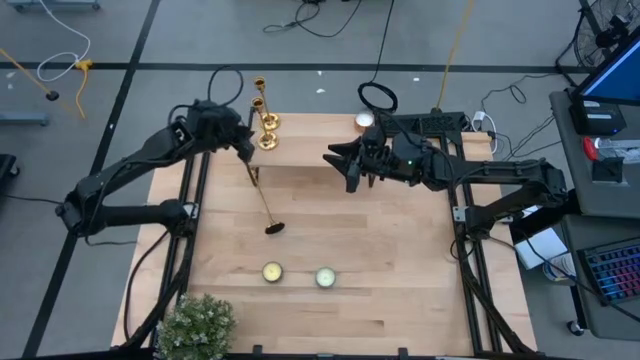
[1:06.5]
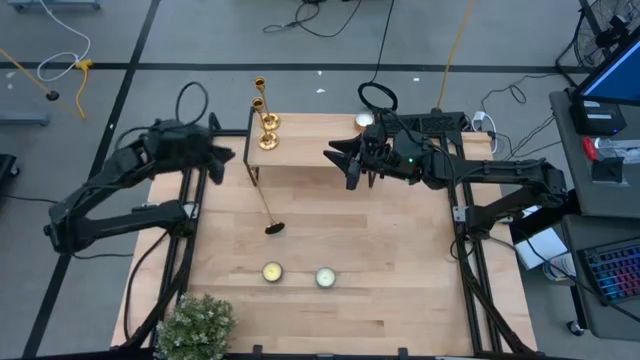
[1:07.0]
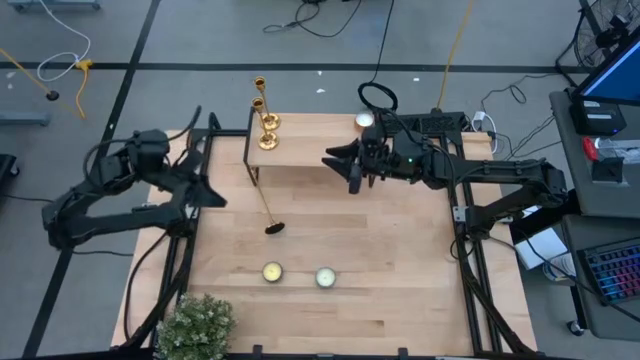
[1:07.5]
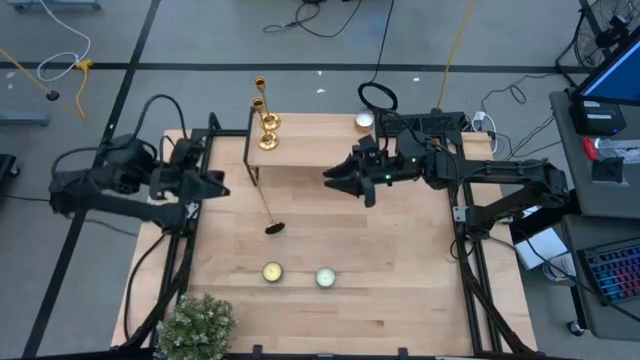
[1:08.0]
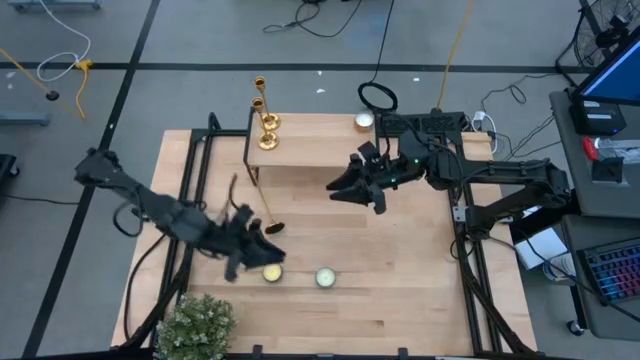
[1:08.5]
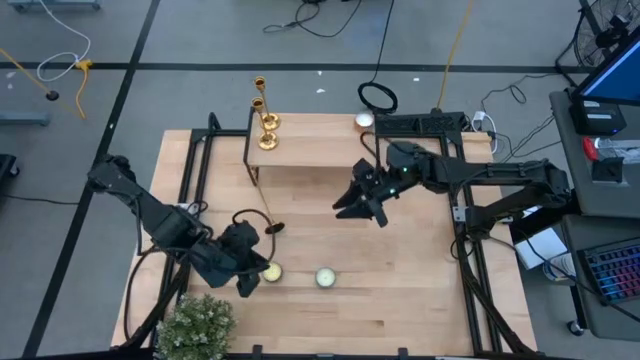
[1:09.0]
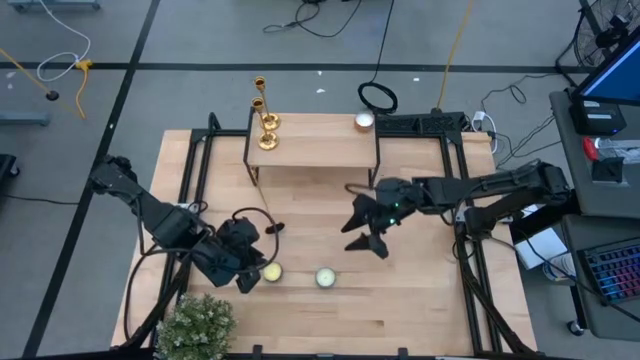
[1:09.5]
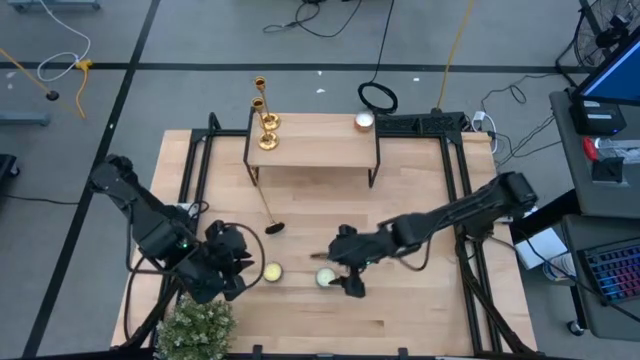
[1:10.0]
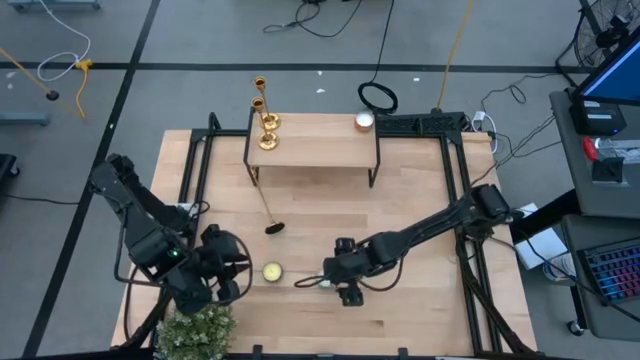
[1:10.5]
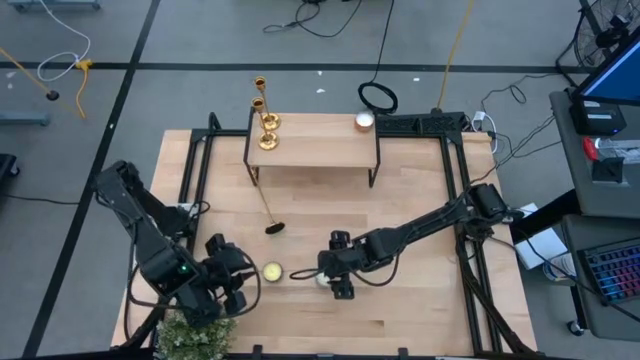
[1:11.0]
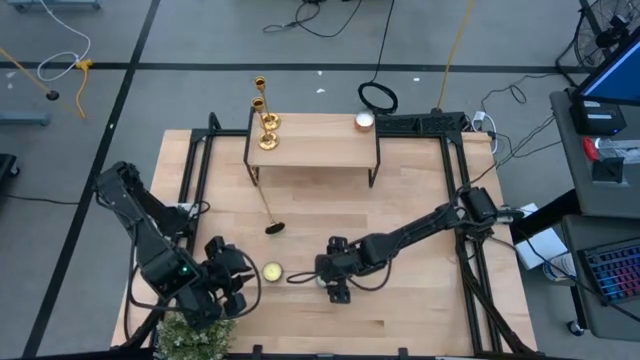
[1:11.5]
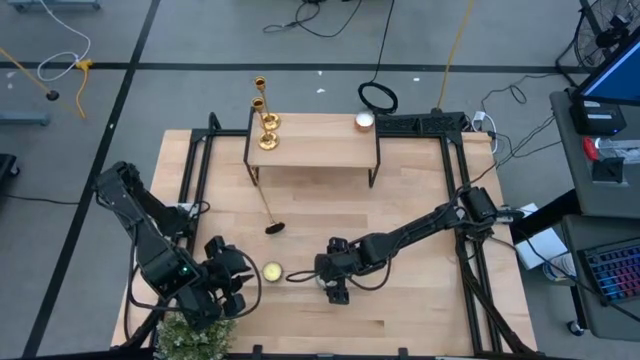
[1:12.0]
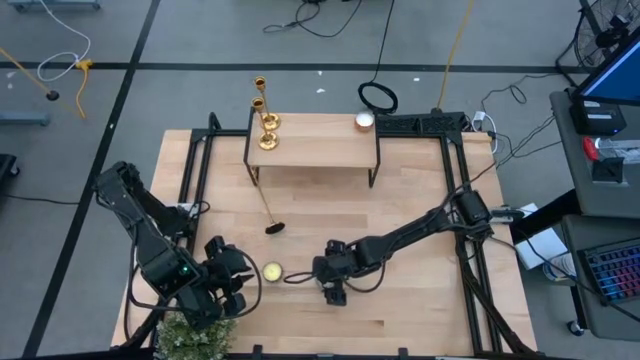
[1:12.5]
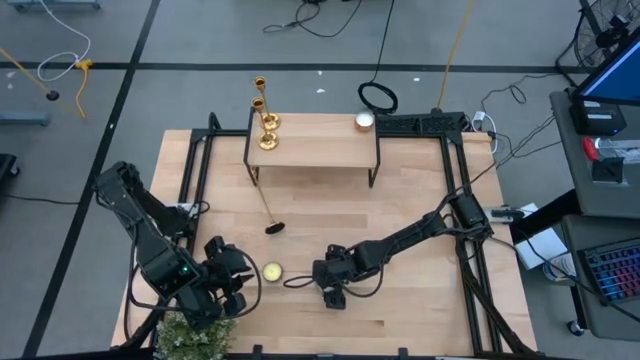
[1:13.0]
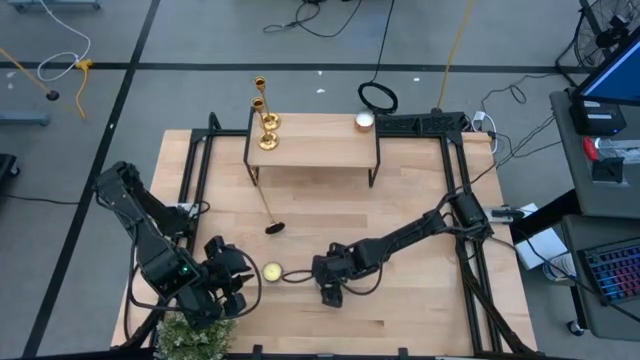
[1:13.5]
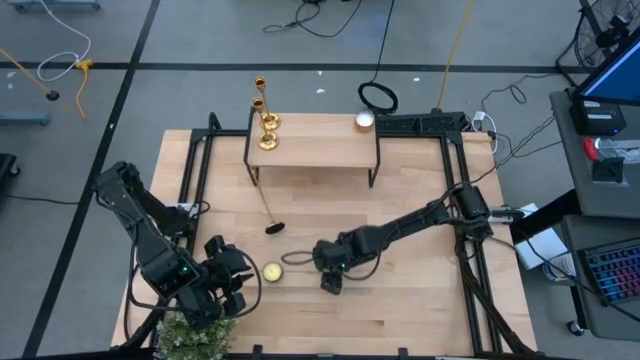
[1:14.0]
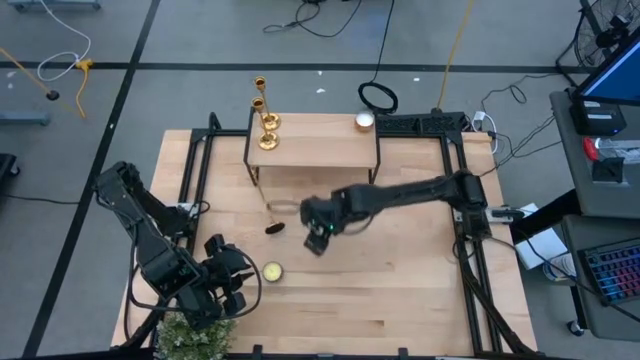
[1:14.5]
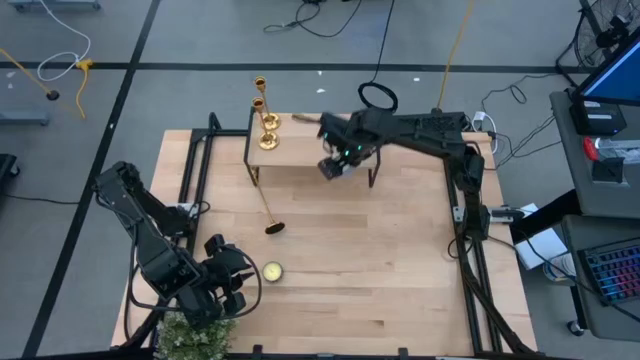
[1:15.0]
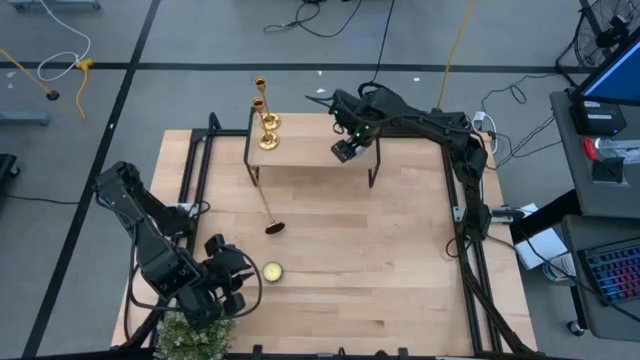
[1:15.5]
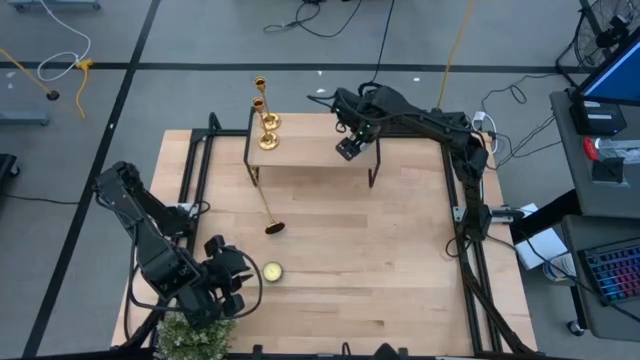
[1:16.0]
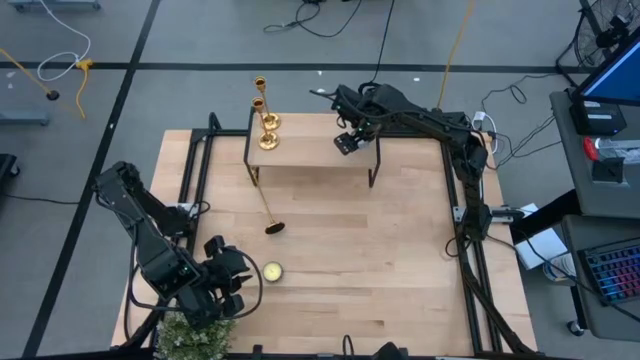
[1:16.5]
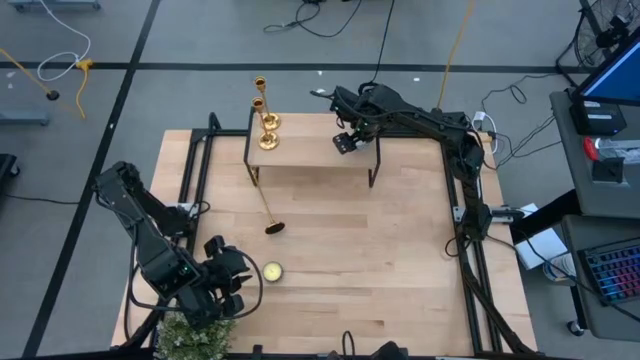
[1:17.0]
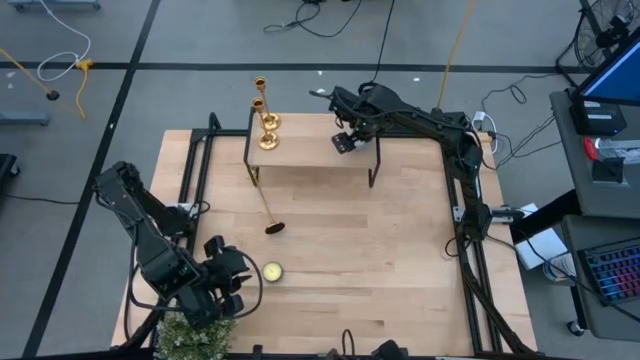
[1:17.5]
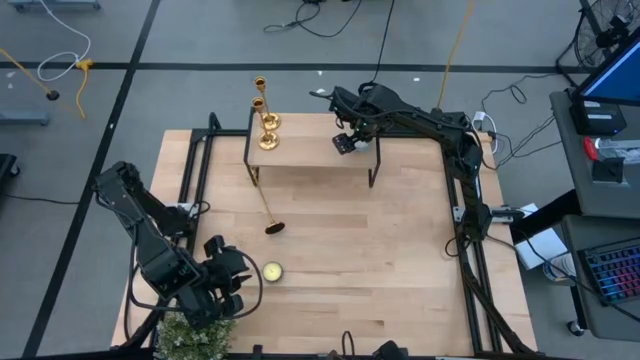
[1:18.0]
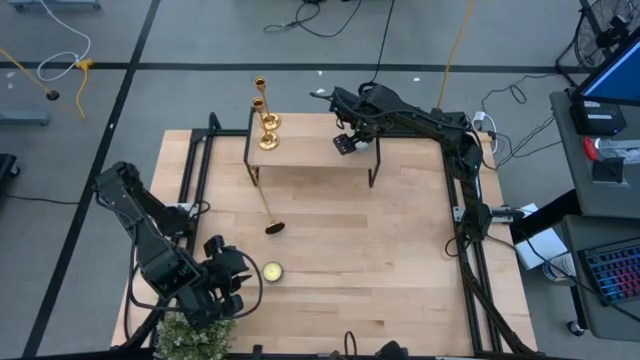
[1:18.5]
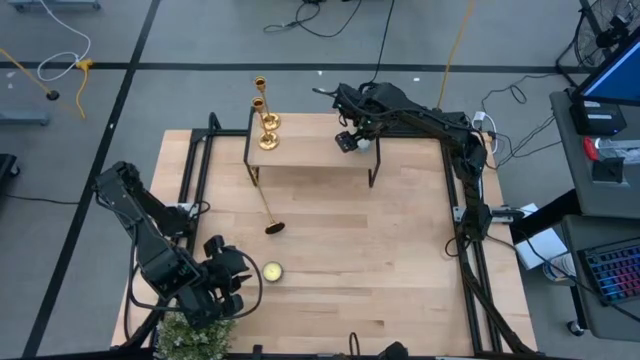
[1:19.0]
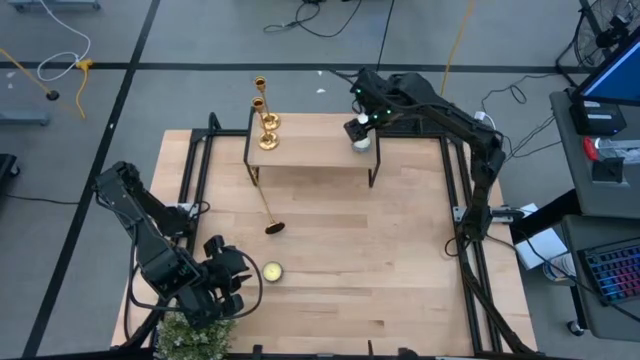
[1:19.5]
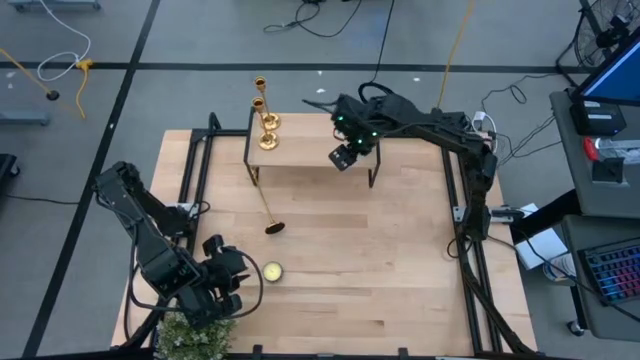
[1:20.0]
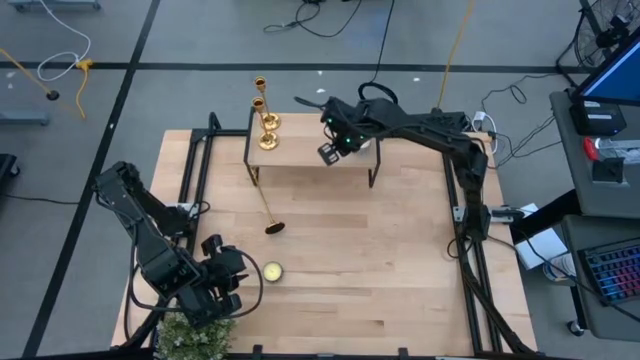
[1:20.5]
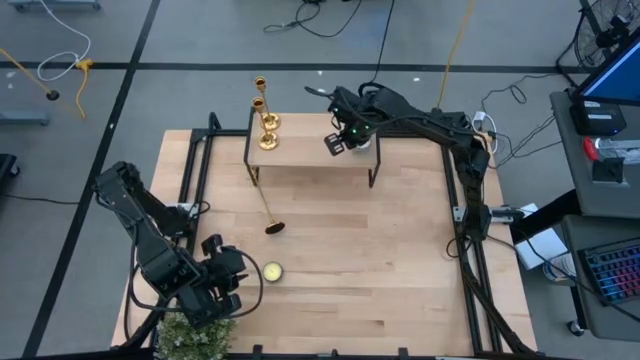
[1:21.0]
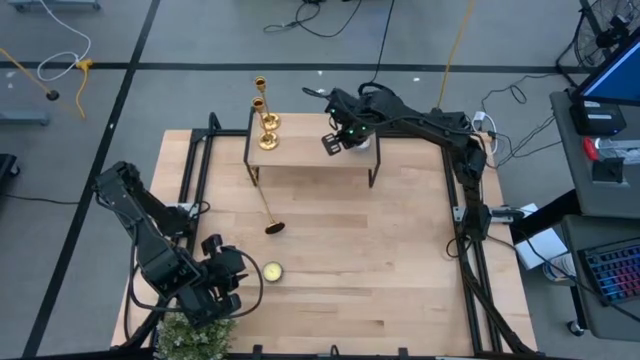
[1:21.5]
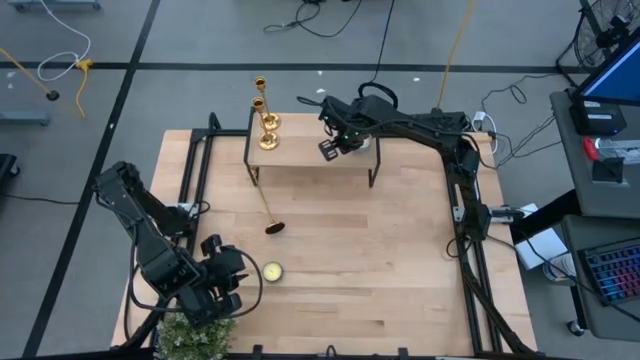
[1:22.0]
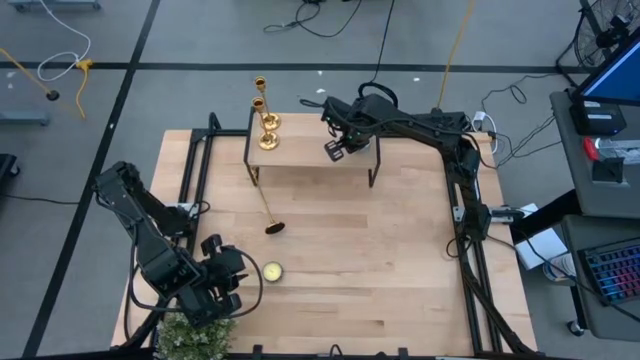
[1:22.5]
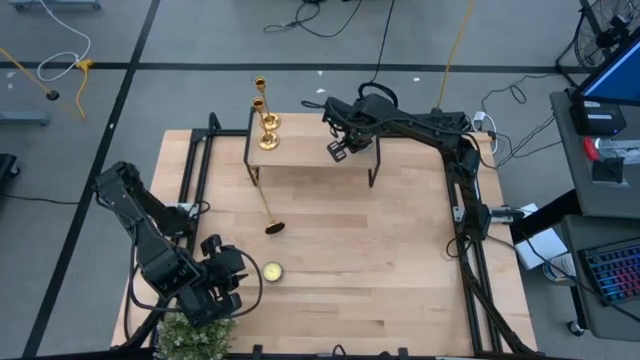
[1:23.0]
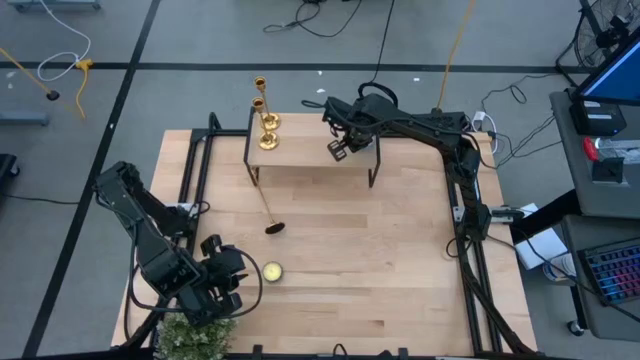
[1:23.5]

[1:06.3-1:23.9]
Task: Pick & Place candle stick holders
Put the green white scented candle on the shelf

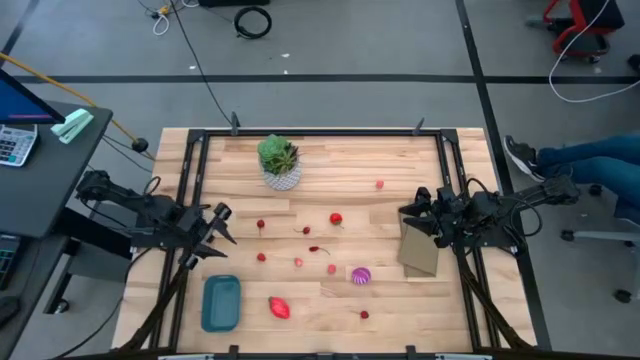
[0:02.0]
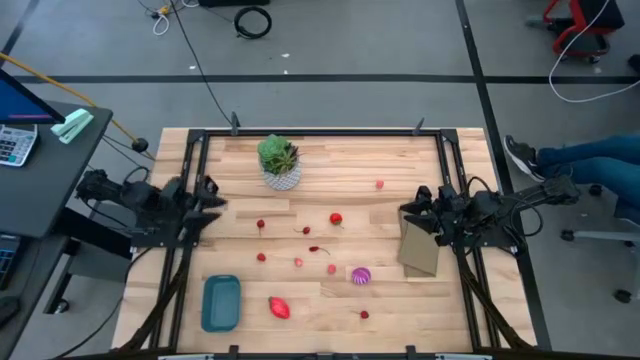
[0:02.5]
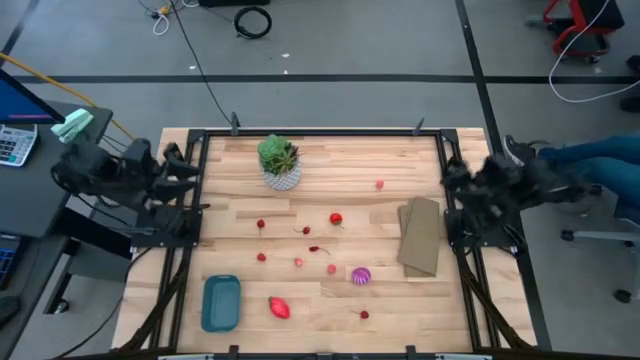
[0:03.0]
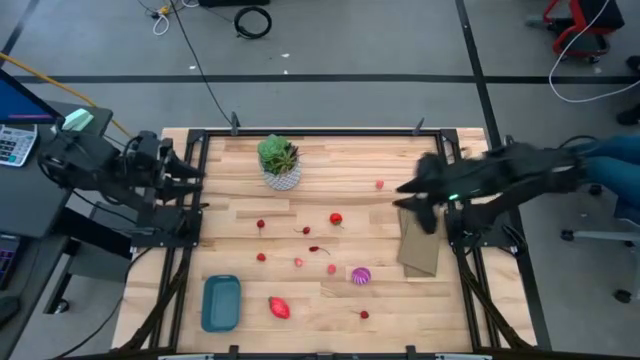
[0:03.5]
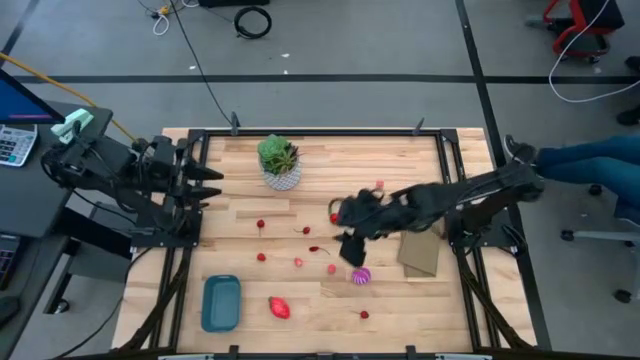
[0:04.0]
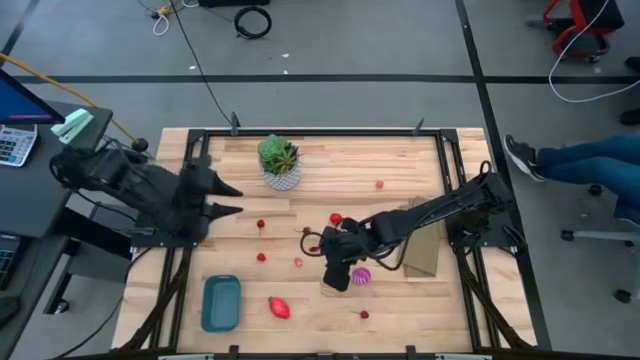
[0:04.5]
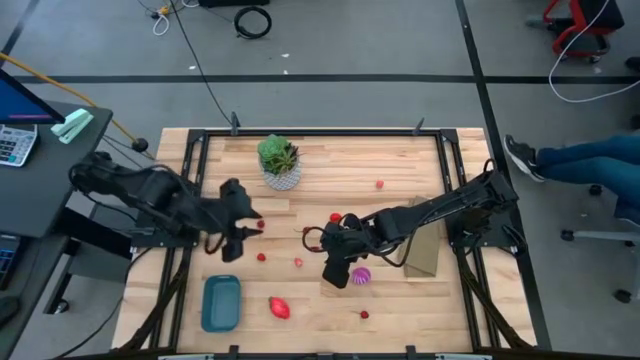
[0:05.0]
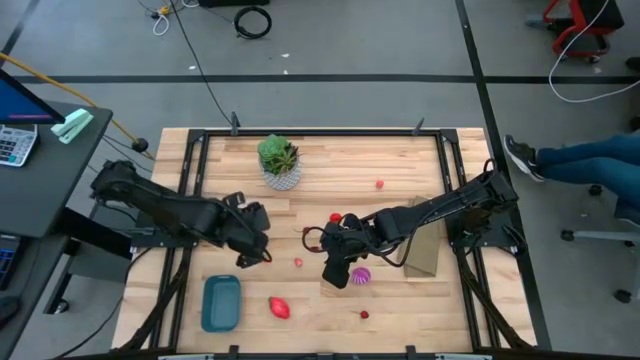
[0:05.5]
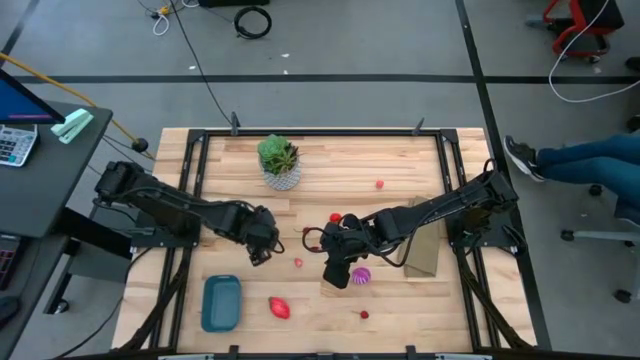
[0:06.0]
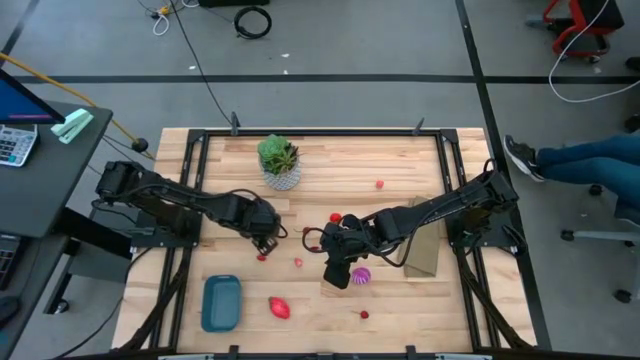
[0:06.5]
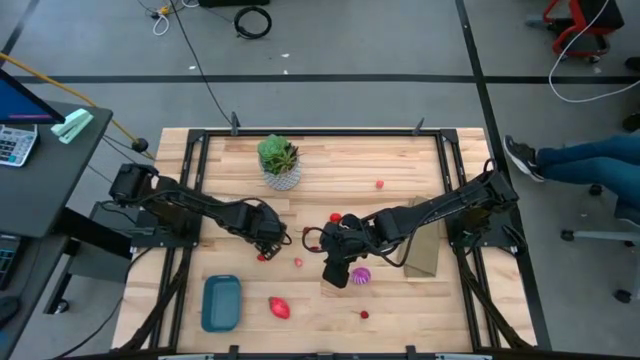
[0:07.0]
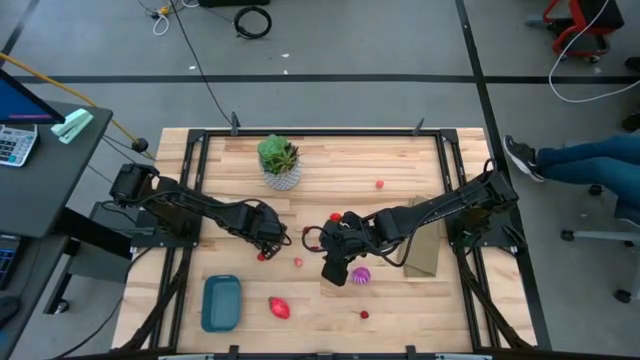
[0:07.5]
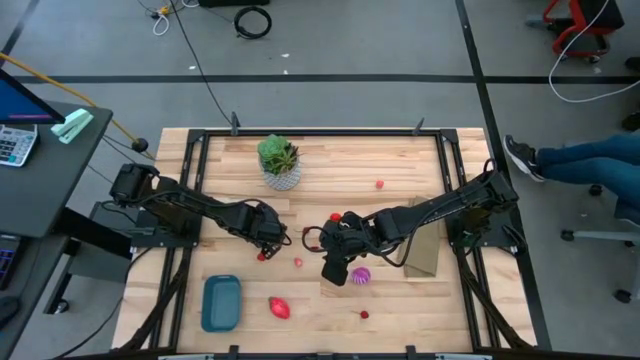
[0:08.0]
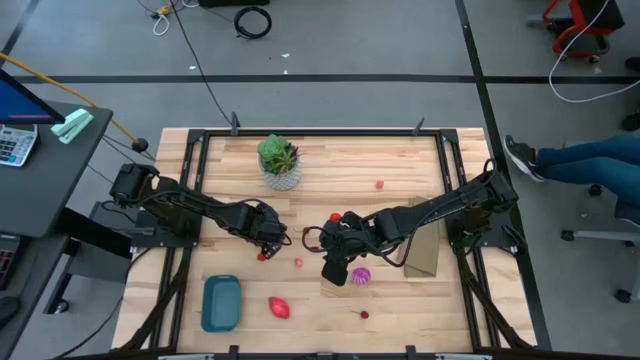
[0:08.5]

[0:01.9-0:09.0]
Task: Pick and placing Produce into tupperware
Put the red cherry into the bin
